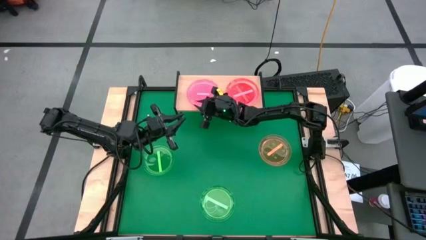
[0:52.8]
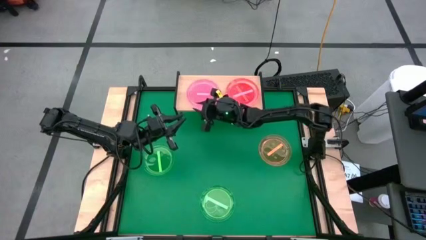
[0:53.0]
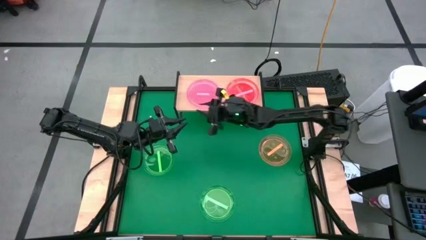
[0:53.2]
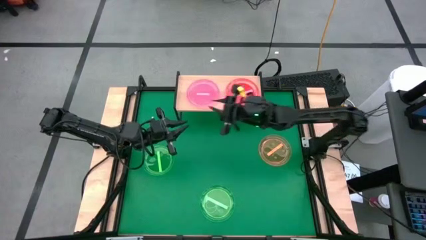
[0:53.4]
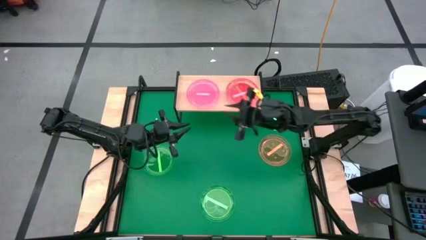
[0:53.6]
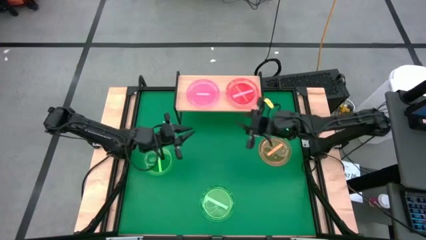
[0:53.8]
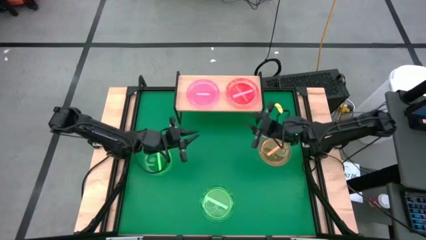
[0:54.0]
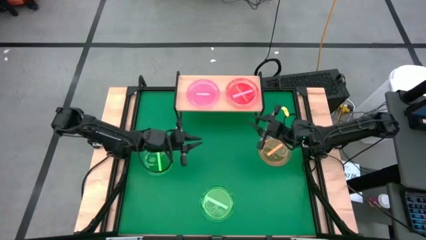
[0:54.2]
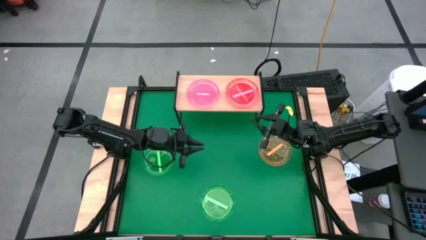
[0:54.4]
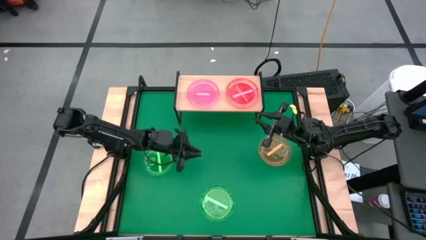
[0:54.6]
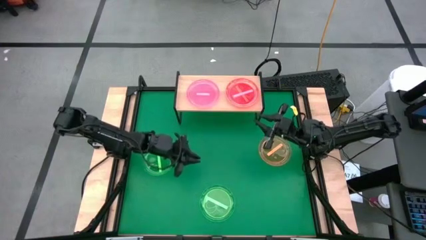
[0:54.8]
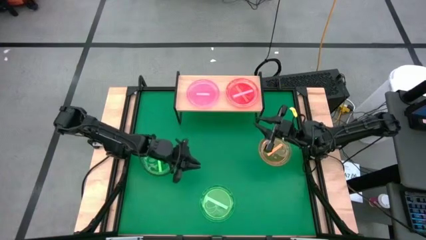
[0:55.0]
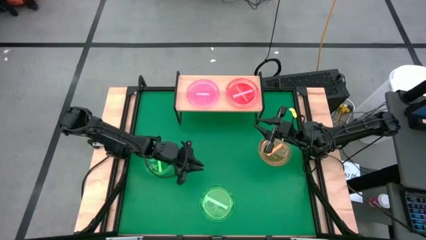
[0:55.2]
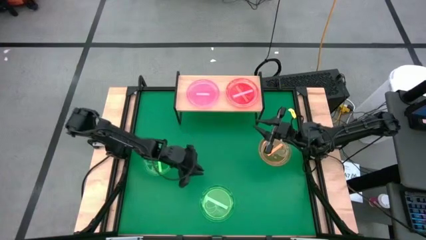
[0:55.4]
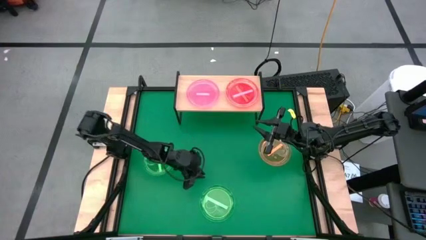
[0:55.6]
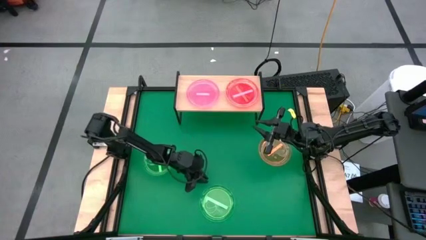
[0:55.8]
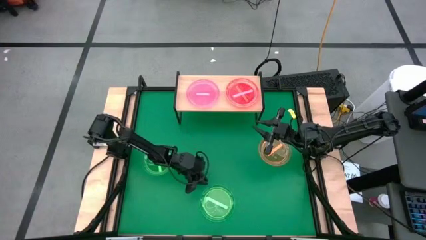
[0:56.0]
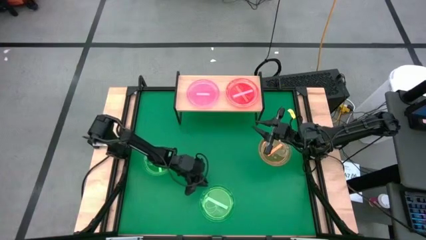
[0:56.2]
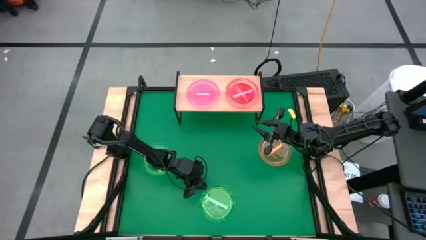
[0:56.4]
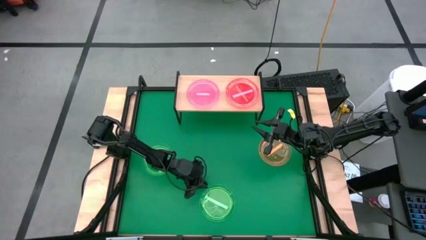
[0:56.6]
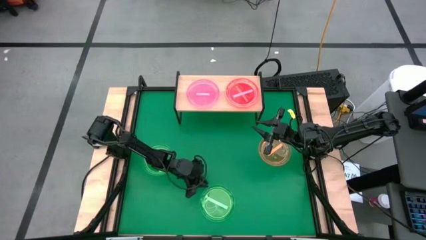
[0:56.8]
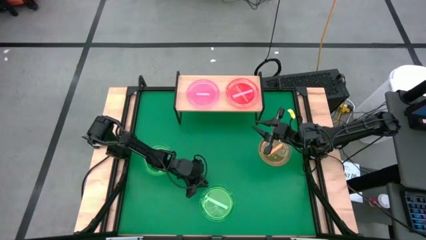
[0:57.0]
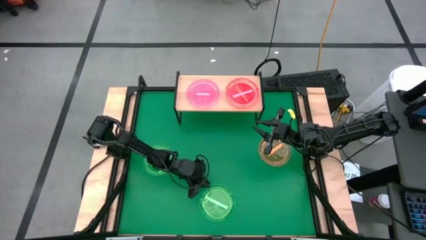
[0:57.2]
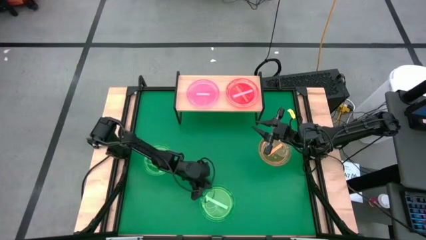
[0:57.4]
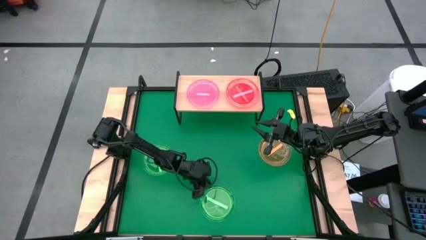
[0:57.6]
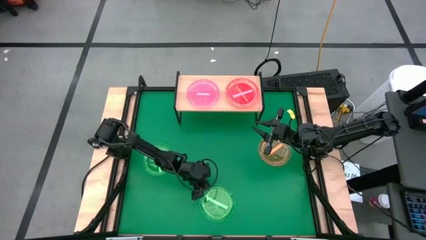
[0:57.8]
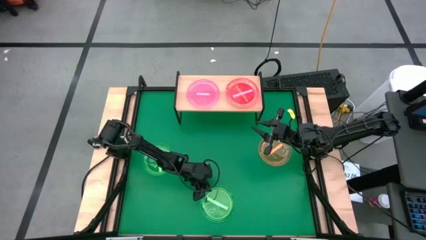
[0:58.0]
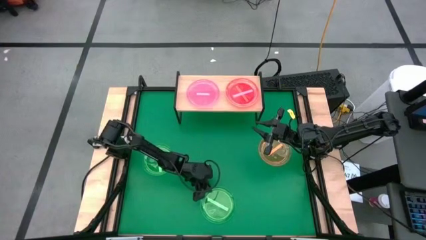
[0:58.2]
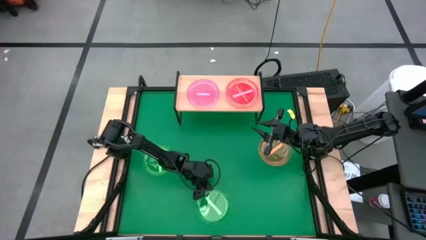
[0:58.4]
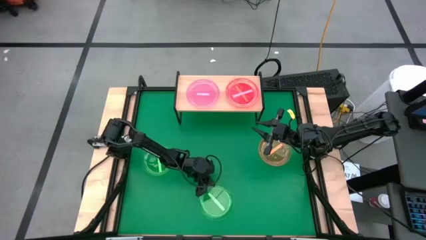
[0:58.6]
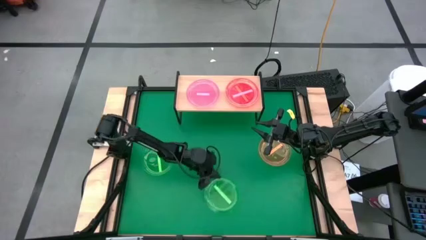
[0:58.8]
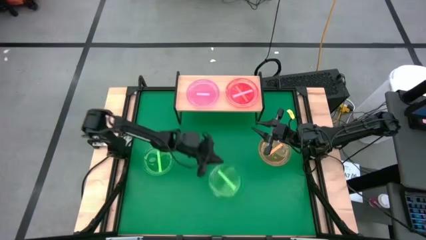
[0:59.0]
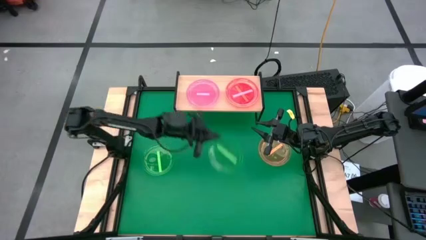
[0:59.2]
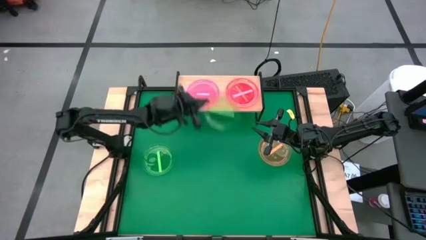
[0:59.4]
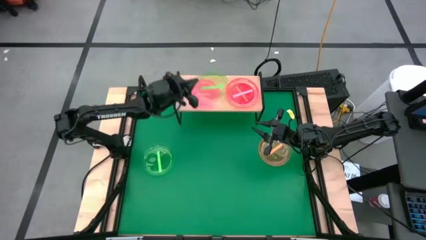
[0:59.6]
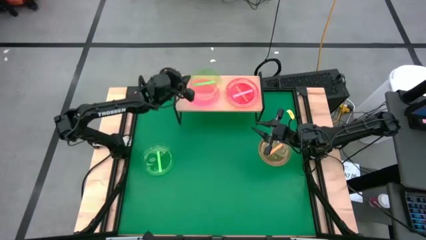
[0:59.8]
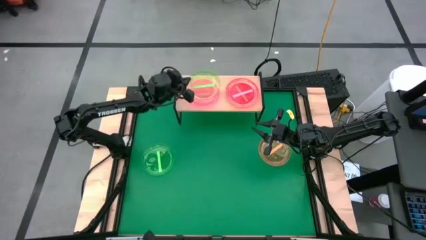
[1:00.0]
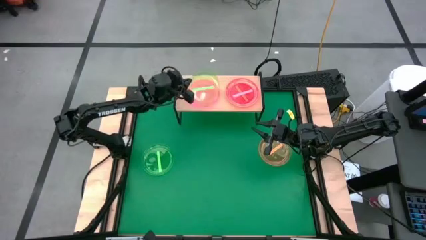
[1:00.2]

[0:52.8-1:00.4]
Task: Place and stack plates onto a shelf
Stack the green plate on top of the pink plate on the shelf

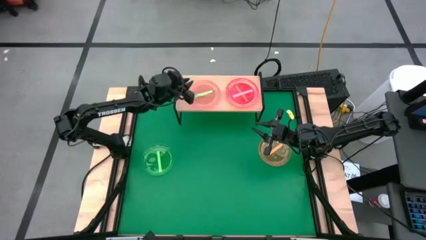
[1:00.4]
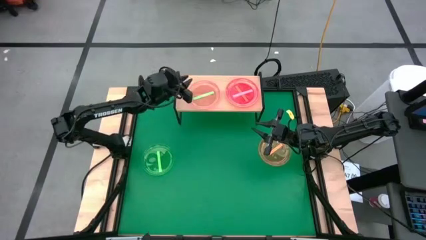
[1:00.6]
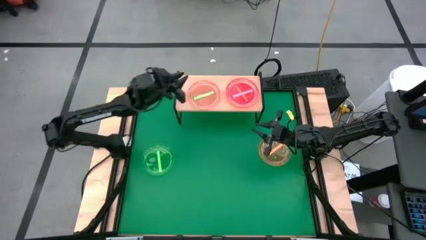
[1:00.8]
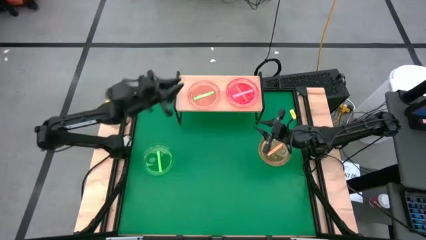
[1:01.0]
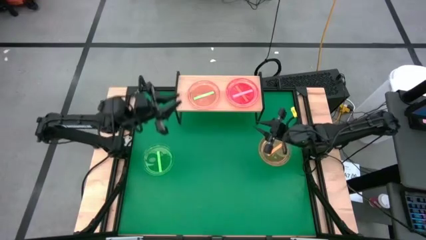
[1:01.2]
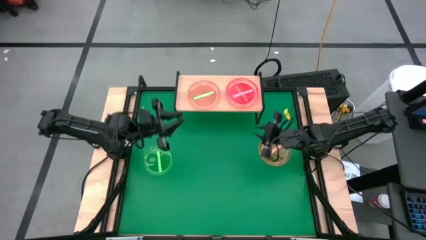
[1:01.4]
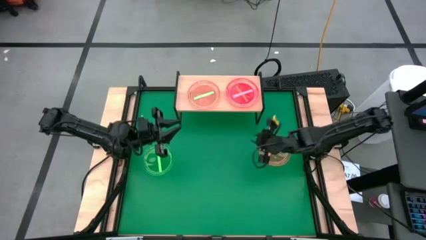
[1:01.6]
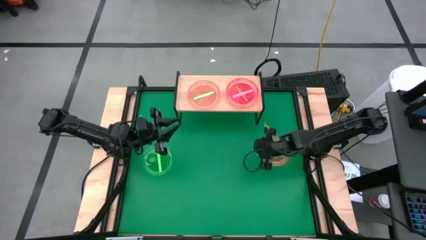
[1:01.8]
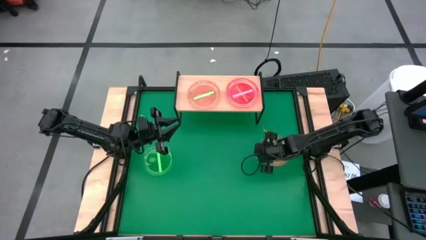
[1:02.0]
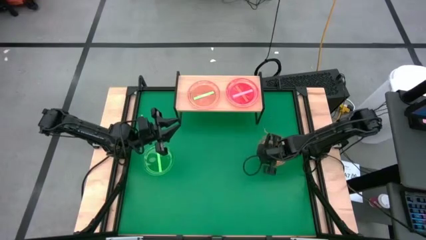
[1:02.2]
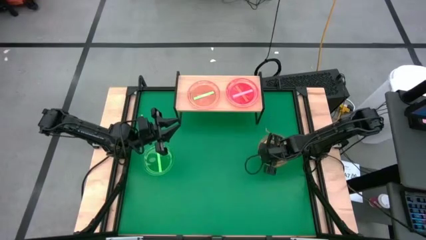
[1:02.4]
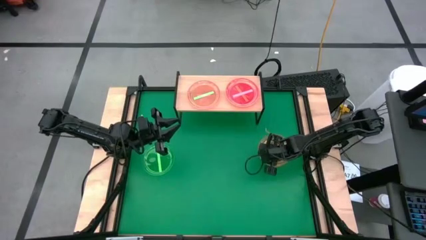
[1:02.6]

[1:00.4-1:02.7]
Stack the orange plate on top of the green plate on the shelf

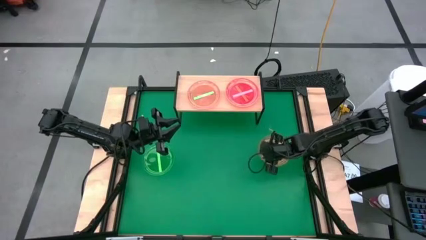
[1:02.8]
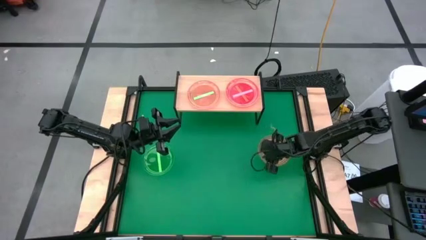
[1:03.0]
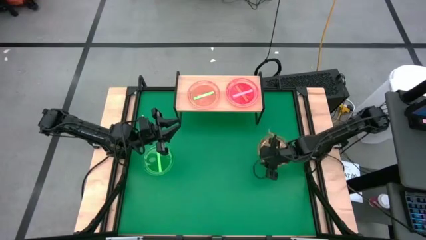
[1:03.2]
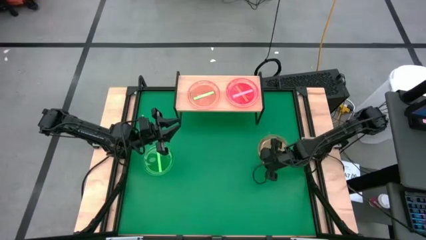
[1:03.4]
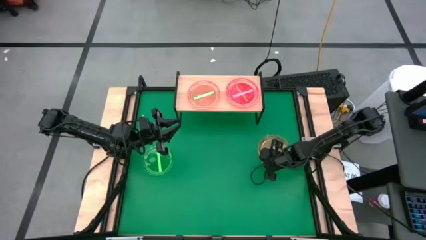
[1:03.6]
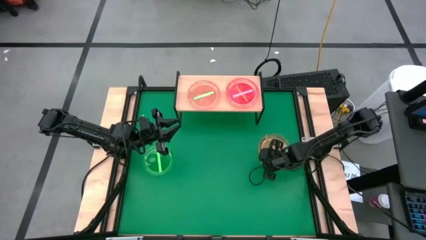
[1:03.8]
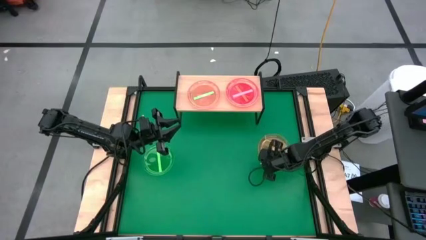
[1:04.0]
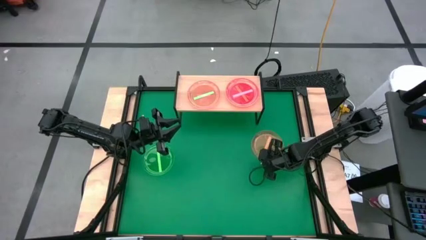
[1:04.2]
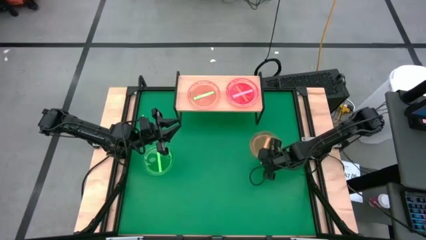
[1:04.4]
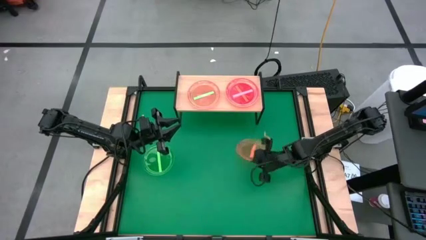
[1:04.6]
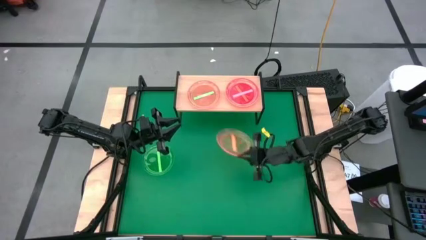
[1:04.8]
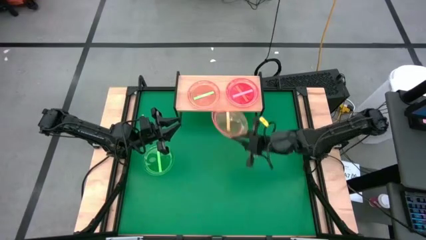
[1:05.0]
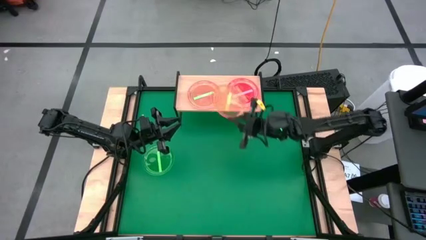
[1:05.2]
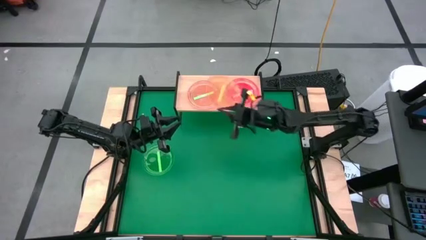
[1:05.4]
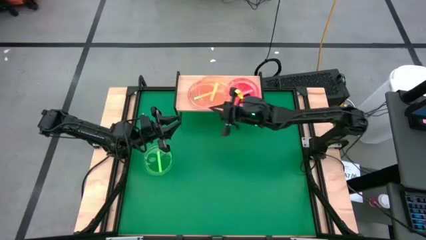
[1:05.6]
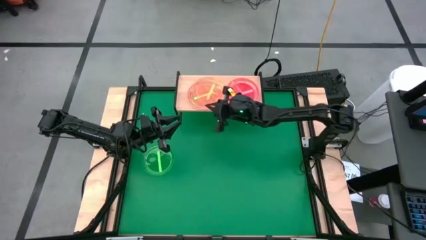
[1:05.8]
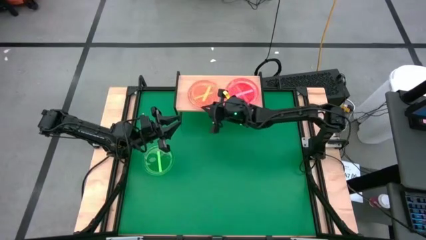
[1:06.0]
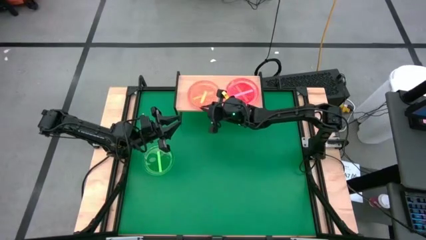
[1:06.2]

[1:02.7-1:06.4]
Stack the orange plate on top of the green plate on the shelf
